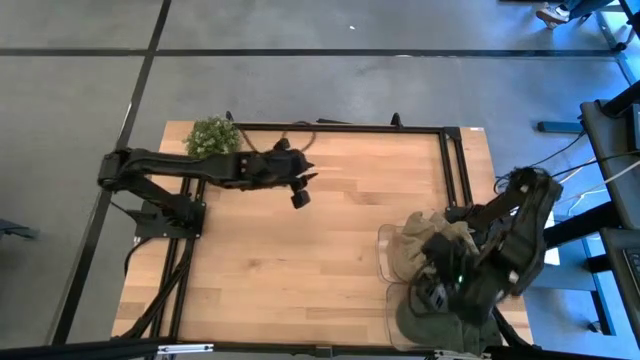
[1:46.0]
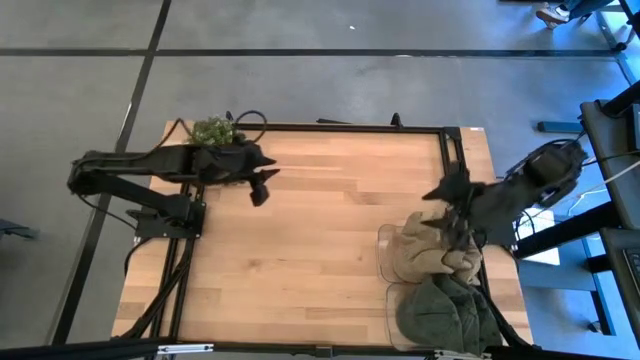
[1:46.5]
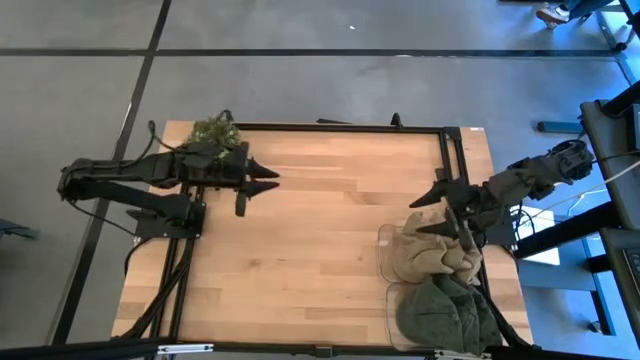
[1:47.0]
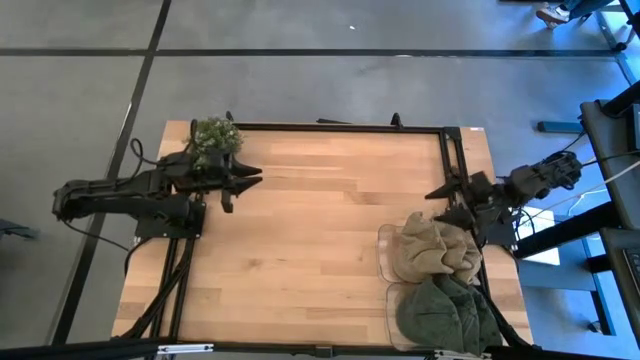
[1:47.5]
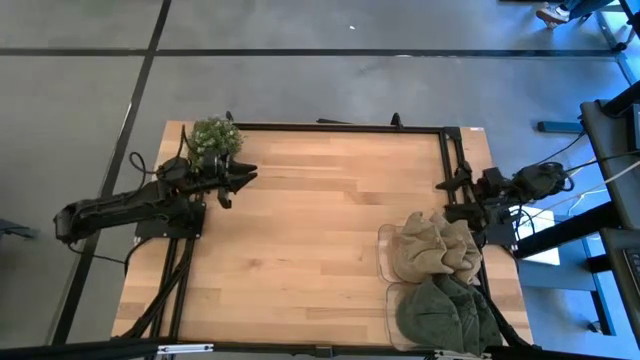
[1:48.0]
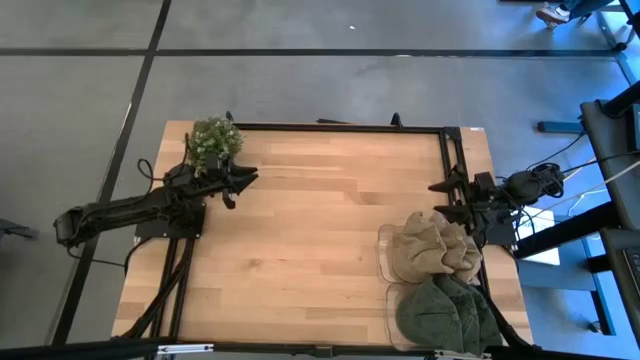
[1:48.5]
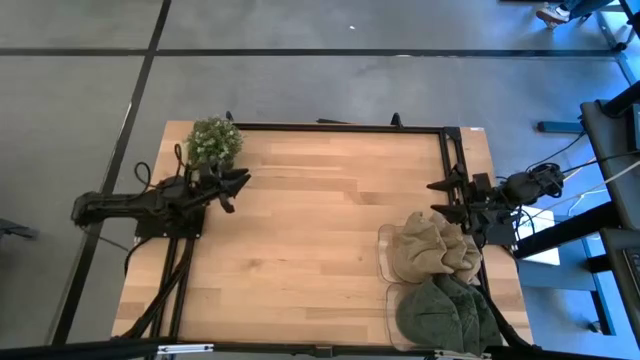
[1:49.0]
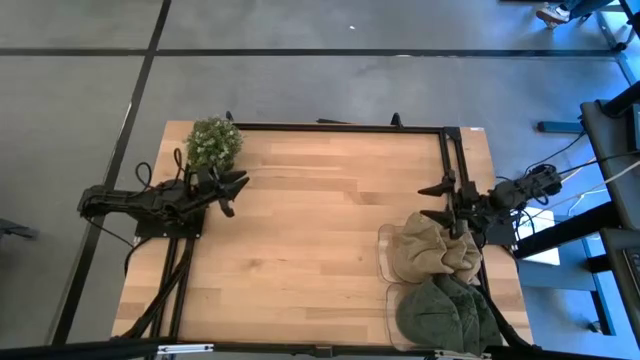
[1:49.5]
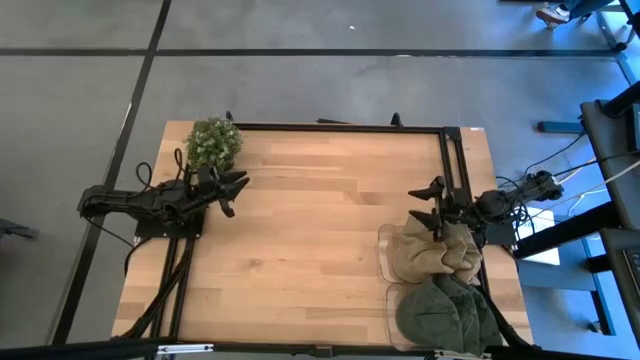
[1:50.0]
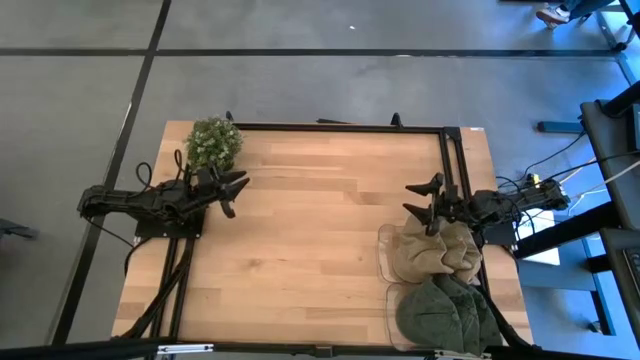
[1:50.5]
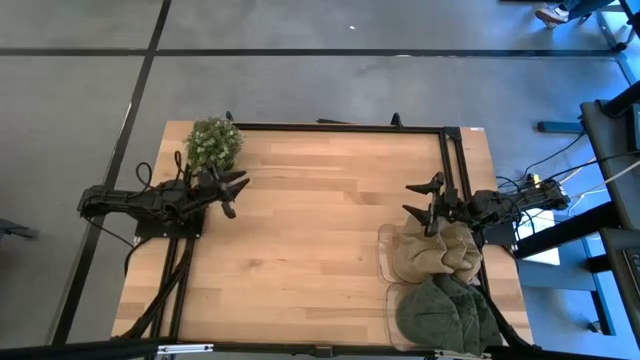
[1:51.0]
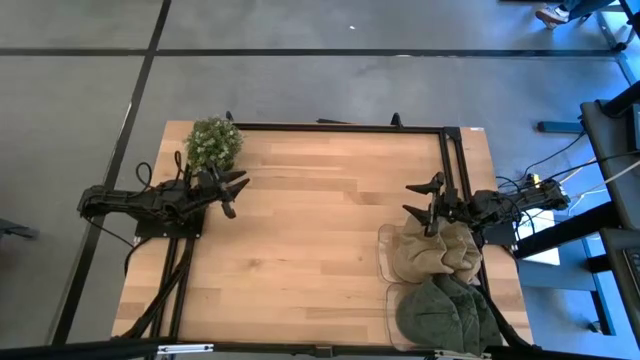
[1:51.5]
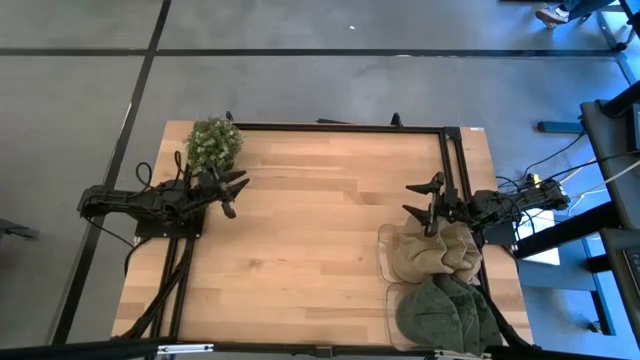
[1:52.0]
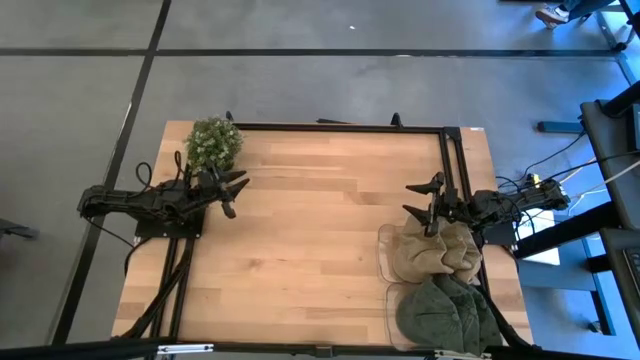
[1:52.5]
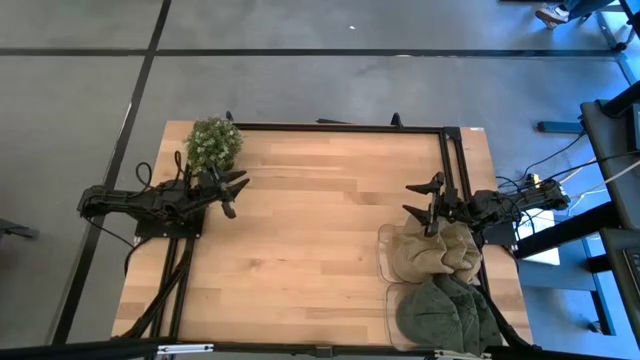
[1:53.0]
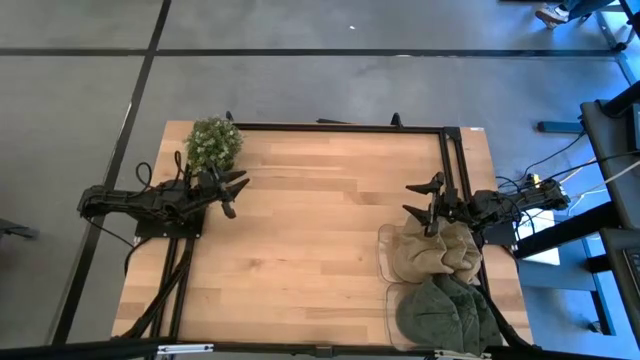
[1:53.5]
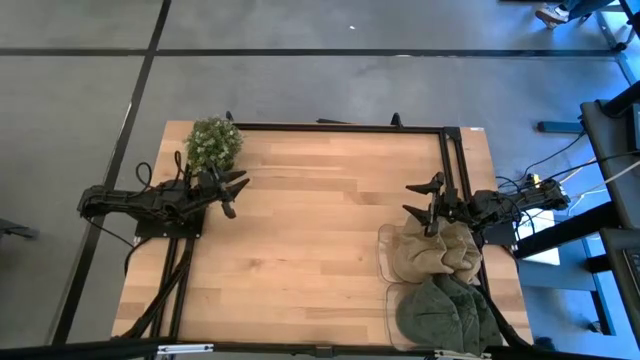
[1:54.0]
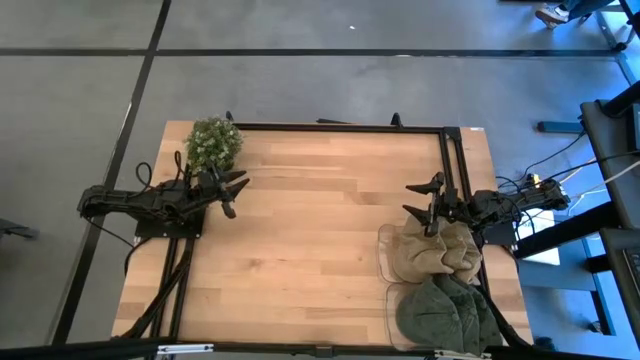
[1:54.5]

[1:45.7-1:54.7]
Task: Pick & Place hat
Return to Home Position

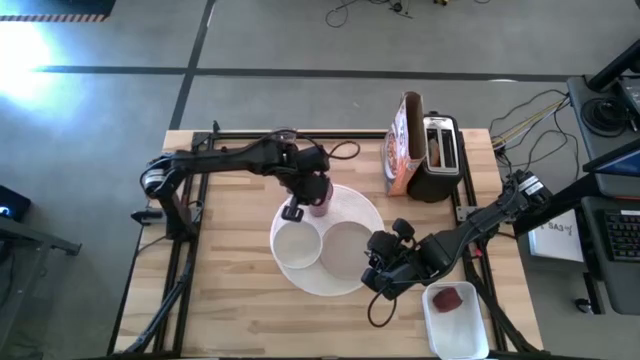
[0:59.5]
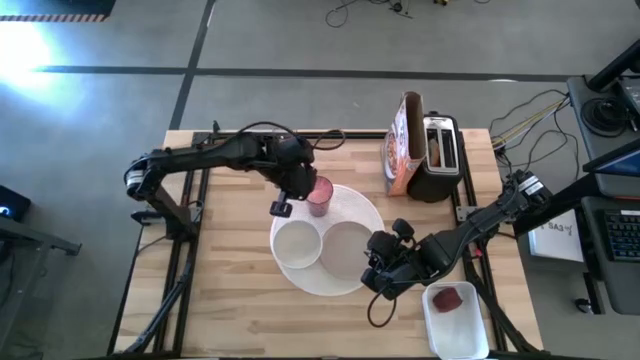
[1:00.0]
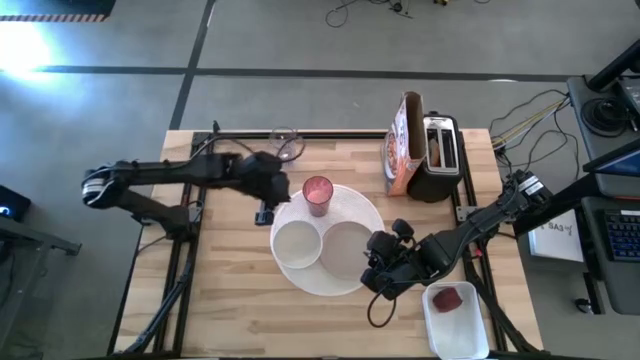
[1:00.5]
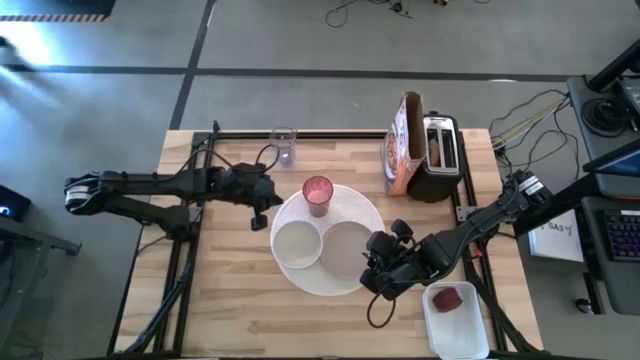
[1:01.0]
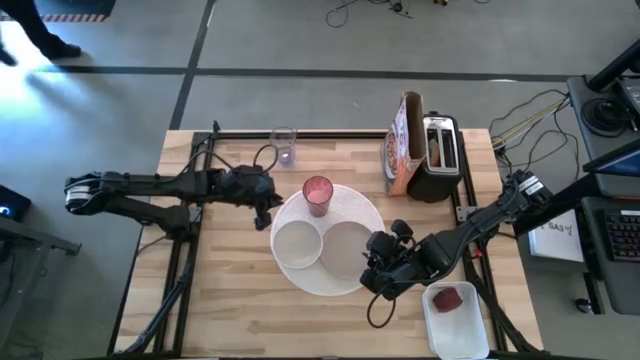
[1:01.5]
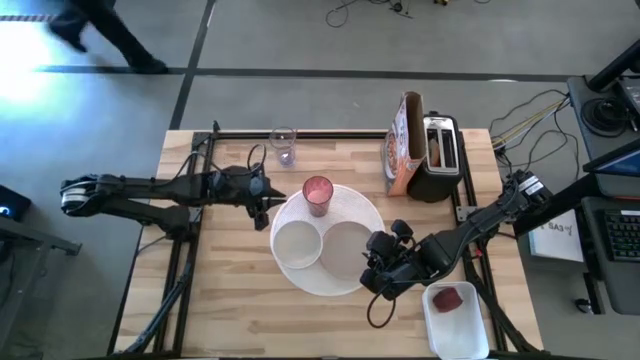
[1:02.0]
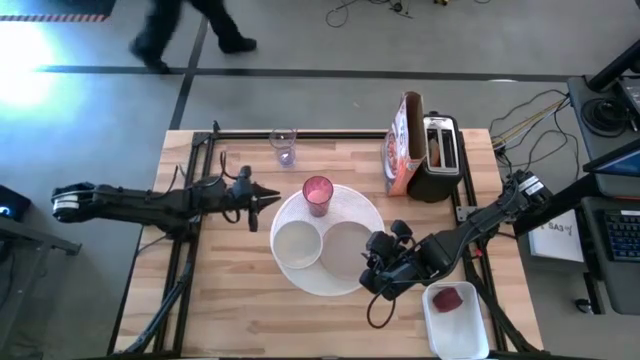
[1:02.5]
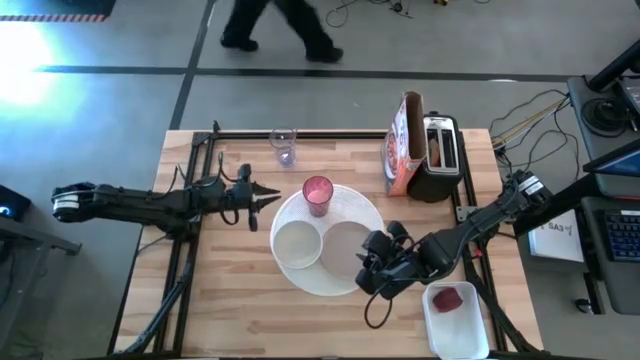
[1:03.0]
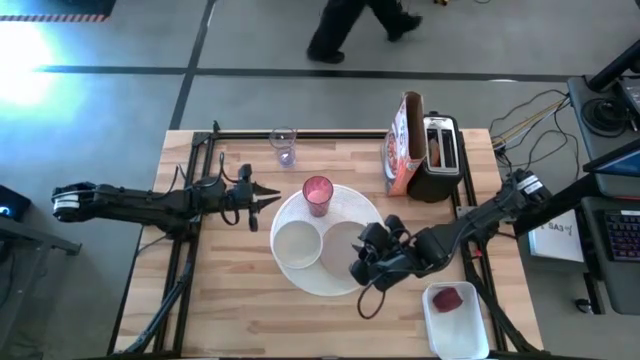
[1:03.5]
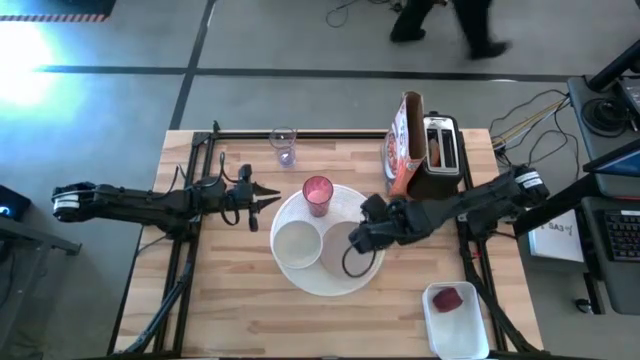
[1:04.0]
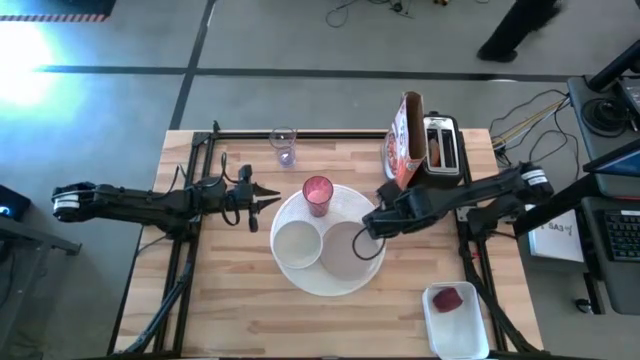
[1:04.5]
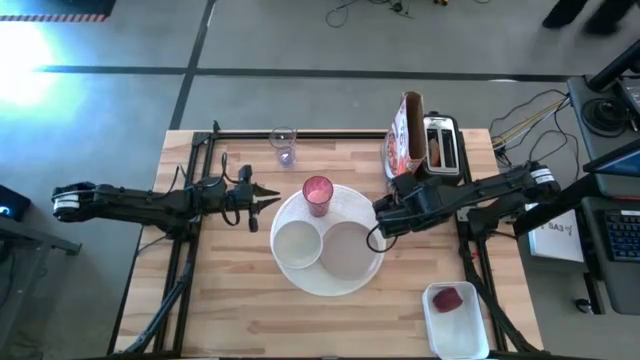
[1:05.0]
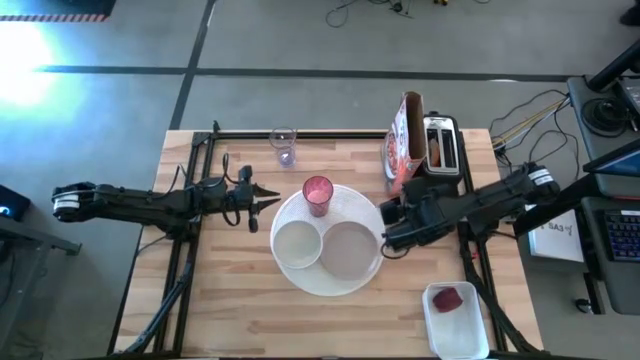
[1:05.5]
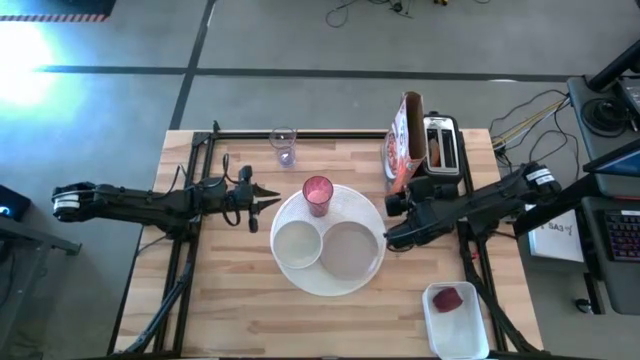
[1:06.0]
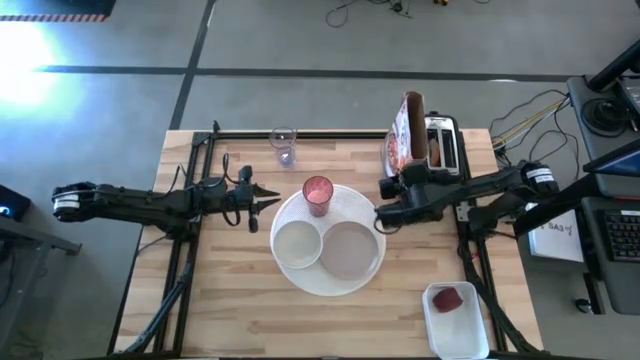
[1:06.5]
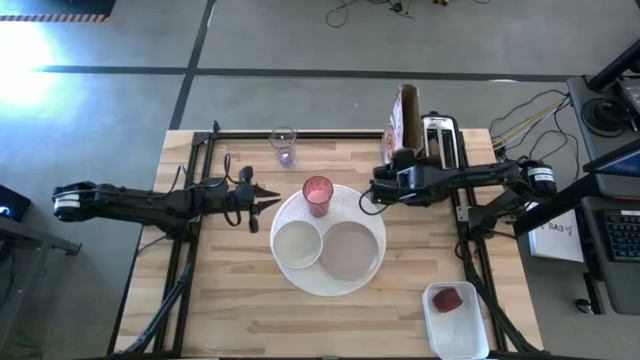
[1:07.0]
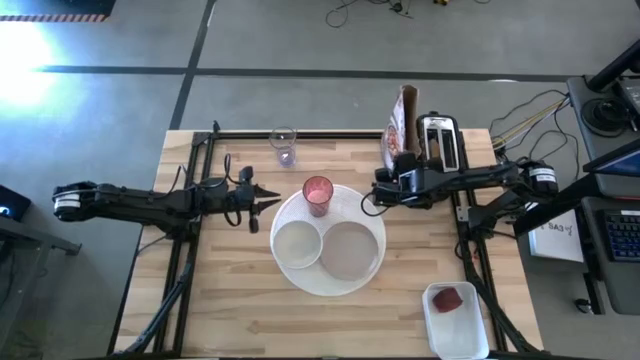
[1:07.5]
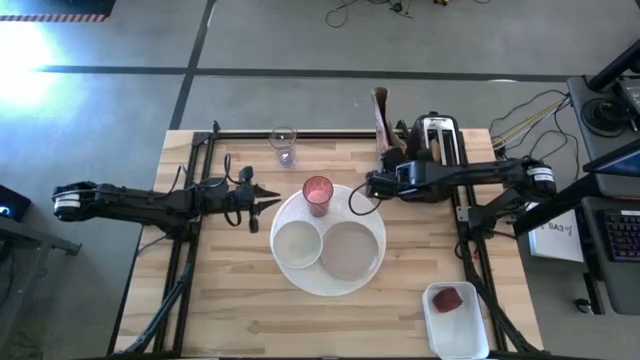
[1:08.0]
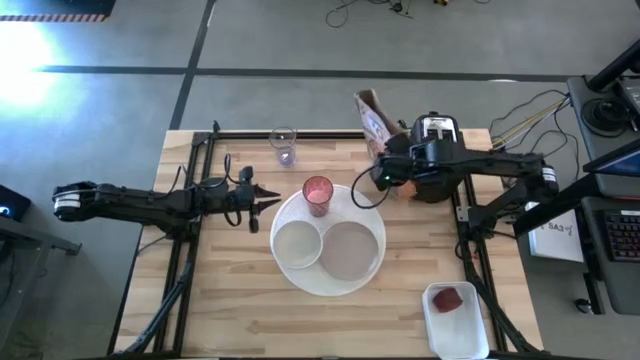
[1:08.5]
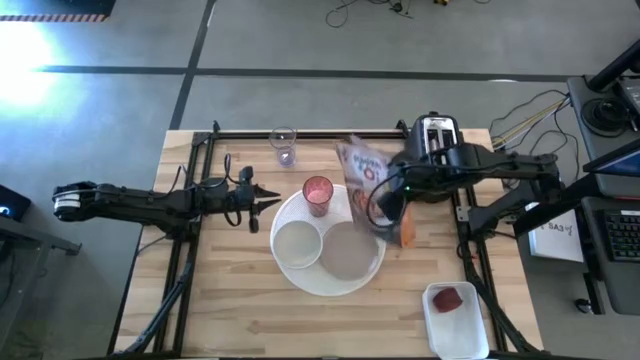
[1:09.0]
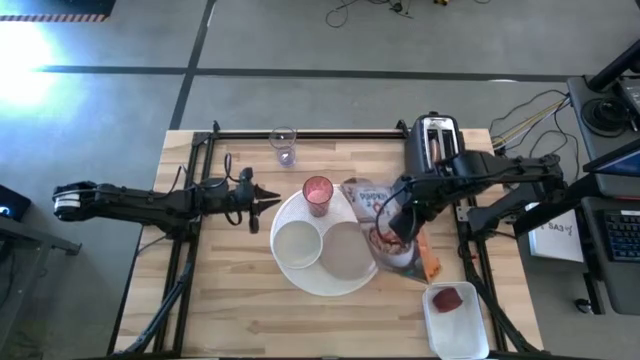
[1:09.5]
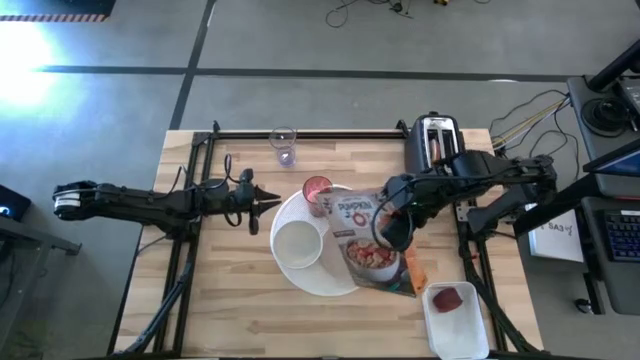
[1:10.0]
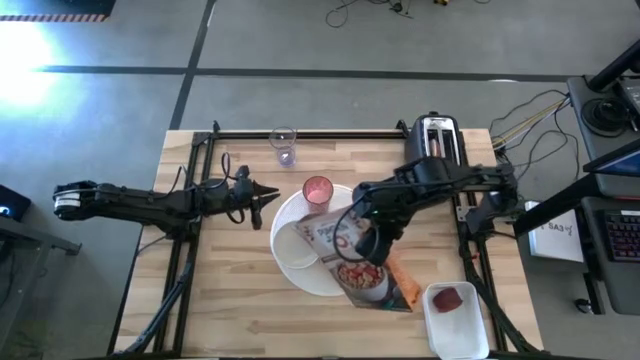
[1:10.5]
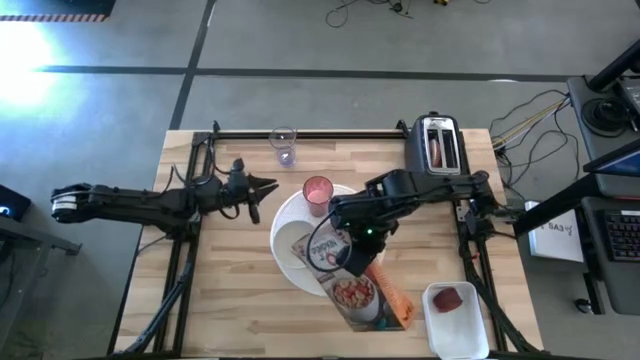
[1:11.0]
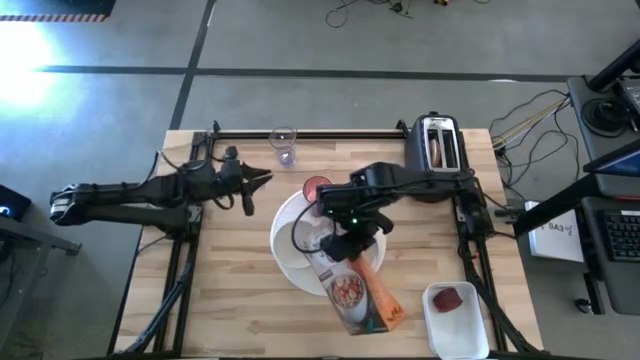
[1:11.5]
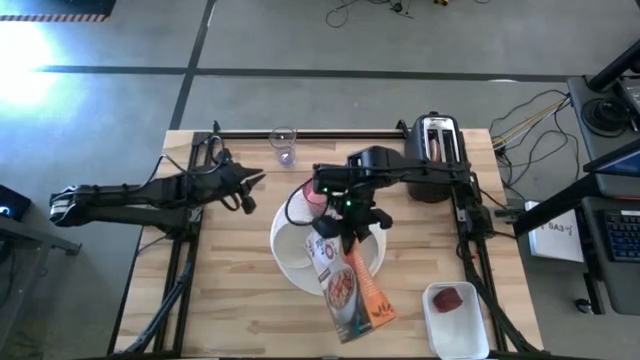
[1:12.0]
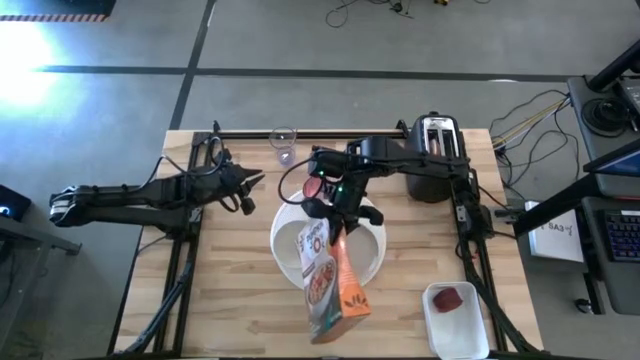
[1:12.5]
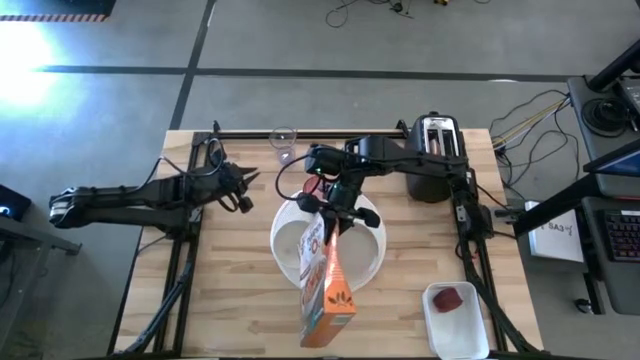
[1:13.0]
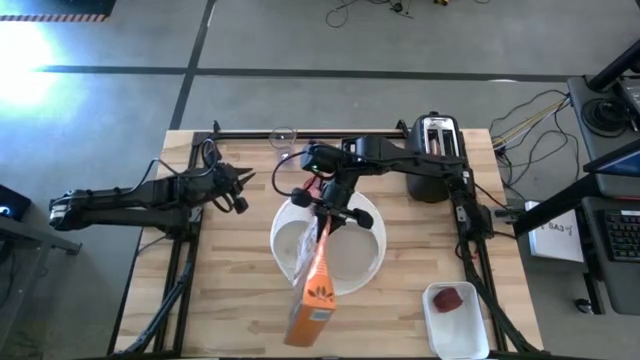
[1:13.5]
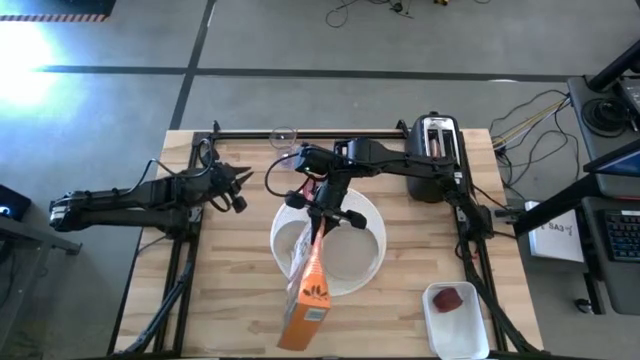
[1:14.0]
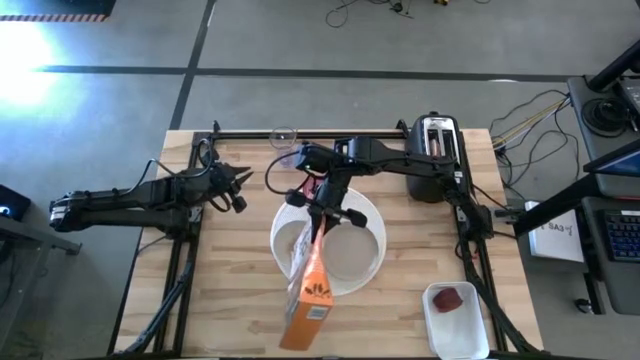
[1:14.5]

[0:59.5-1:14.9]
Task: Arrange a breakfast setting
Pour the cereals from the cereal box into the white bowl
